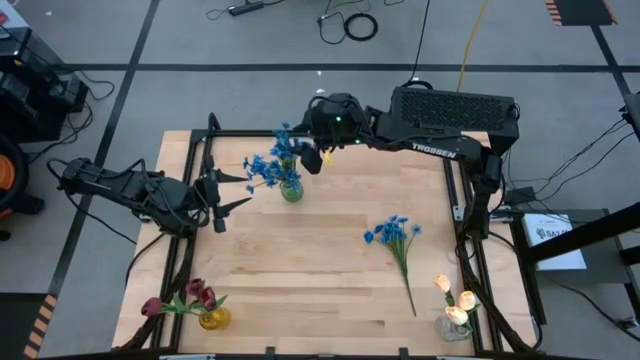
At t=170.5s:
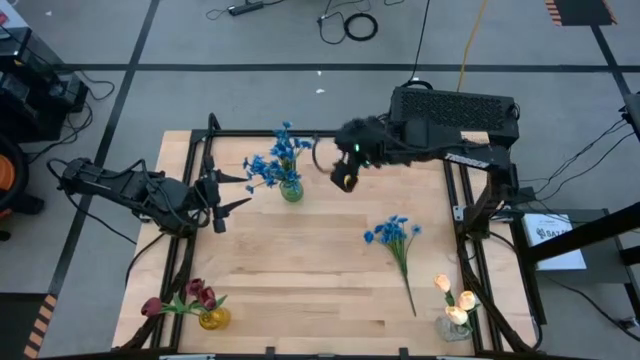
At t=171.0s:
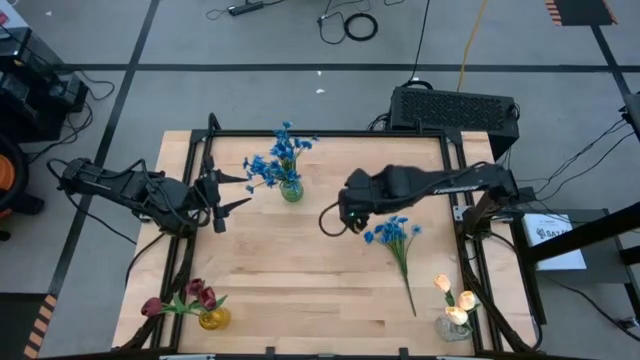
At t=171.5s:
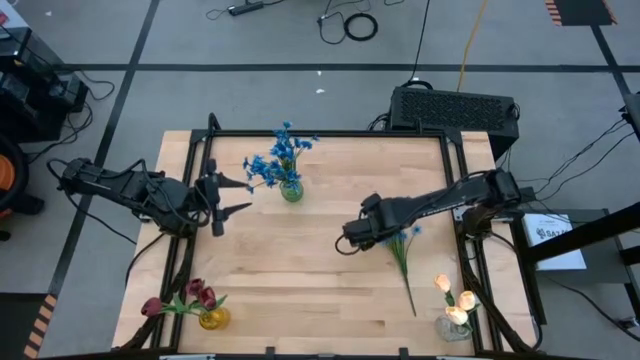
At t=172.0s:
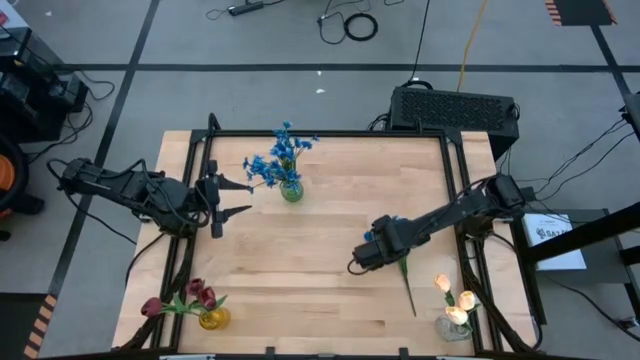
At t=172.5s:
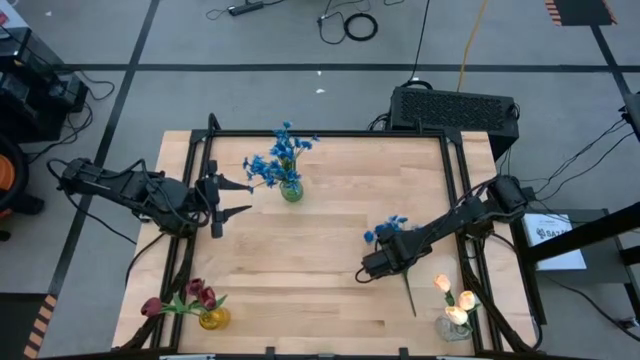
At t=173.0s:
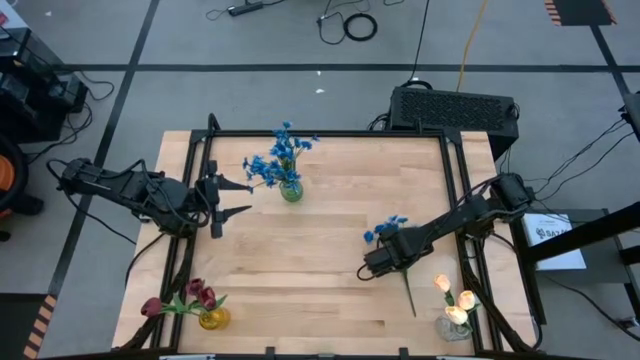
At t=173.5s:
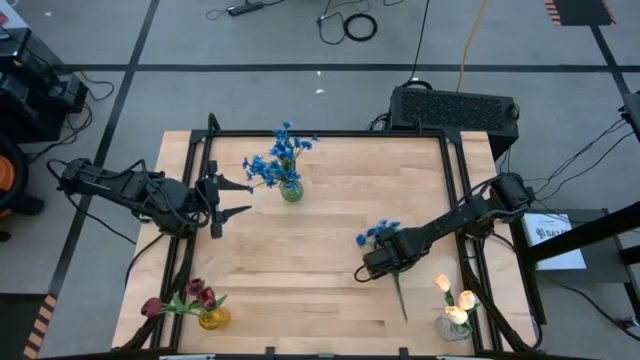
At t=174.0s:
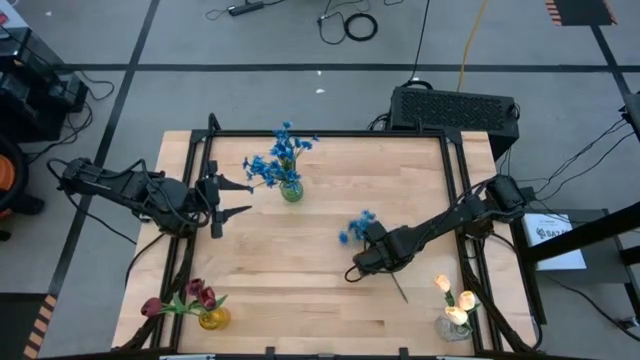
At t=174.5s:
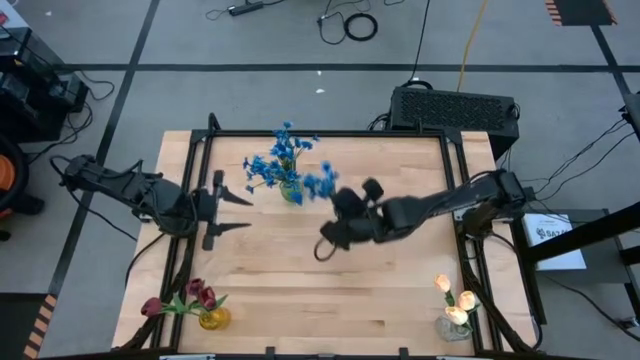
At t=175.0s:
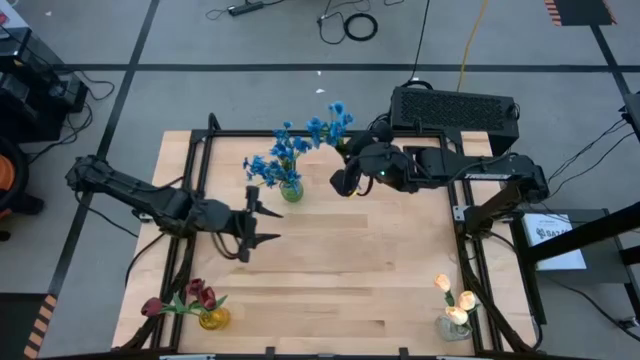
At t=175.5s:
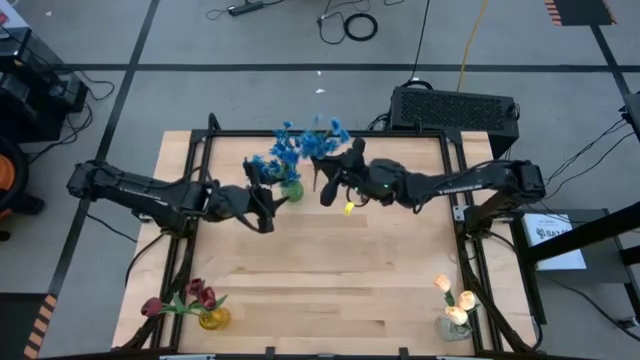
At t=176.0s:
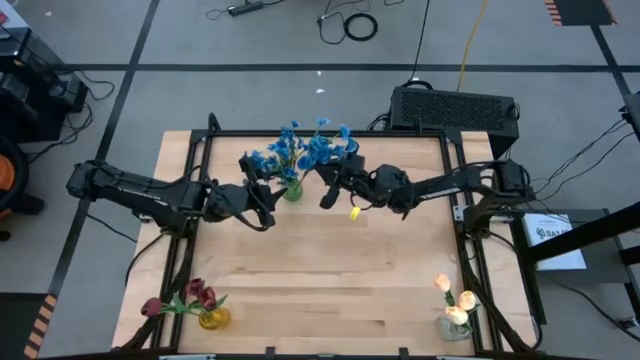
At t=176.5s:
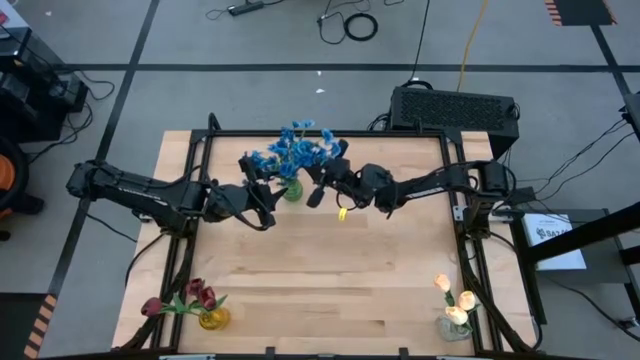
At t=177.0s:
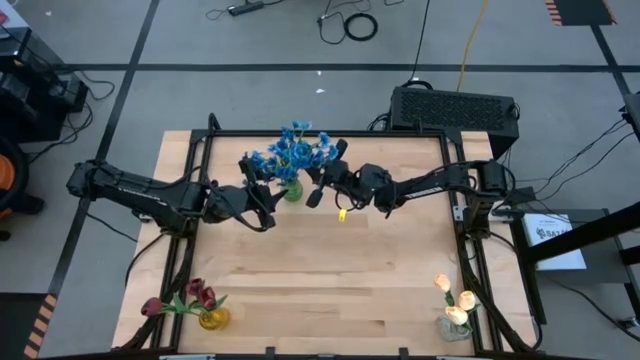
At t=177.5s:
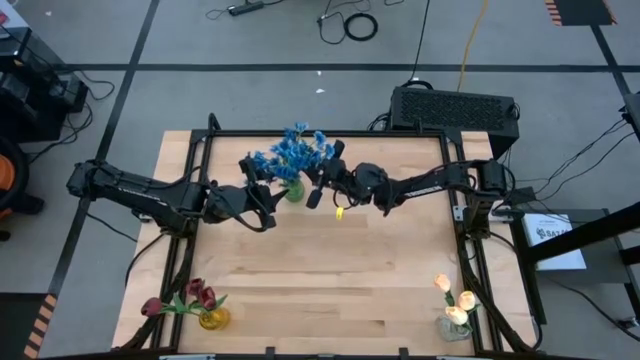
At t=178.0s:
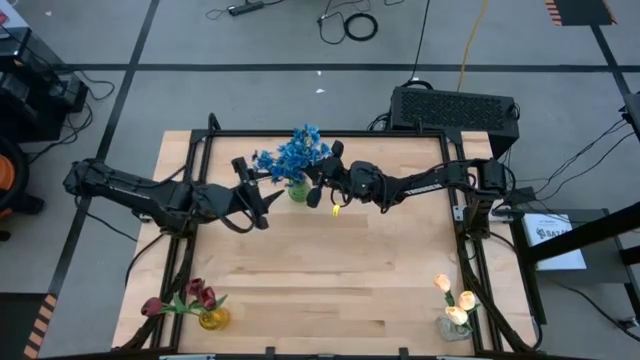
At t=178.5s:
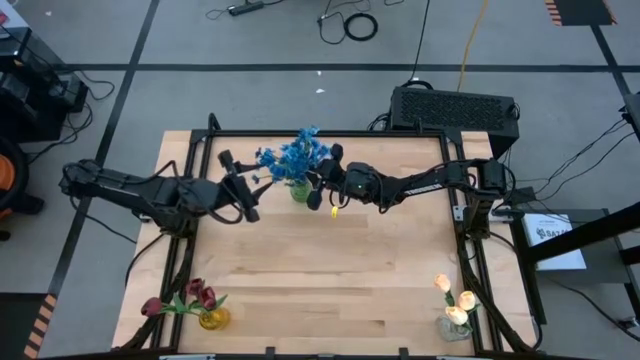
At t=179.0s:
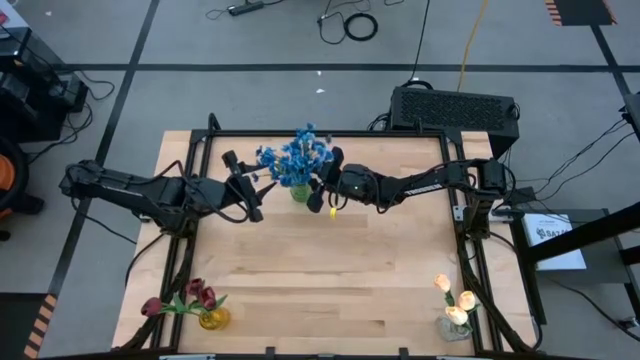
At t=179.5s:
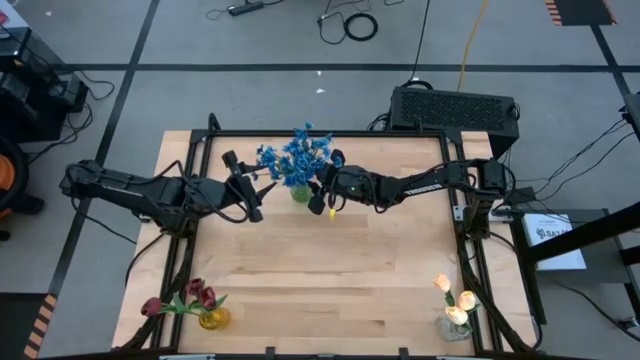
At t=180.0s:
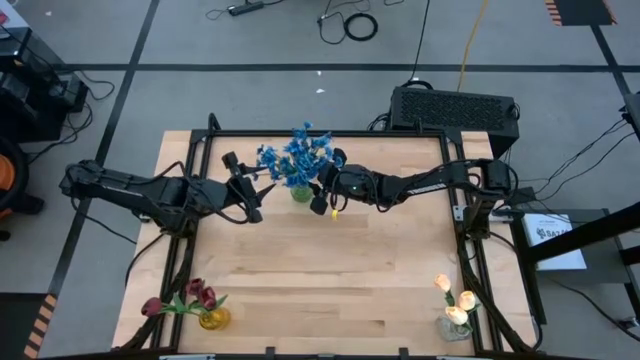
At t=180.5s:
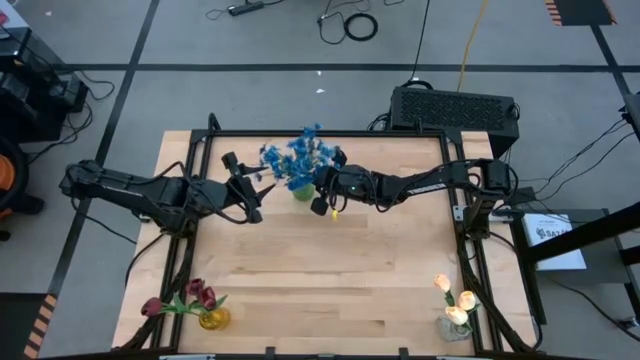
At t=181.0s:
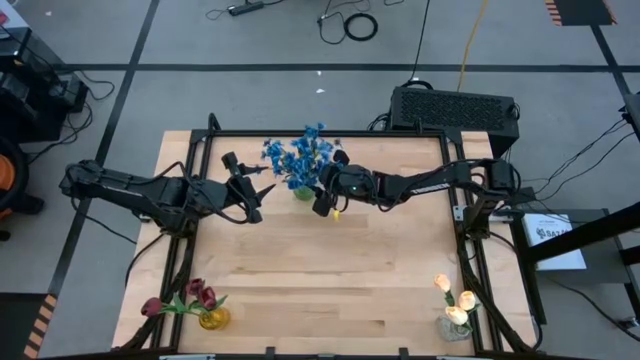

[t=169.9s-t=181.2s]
Task: Sort flowers into vase by color
Put the blue flowers into the green vase

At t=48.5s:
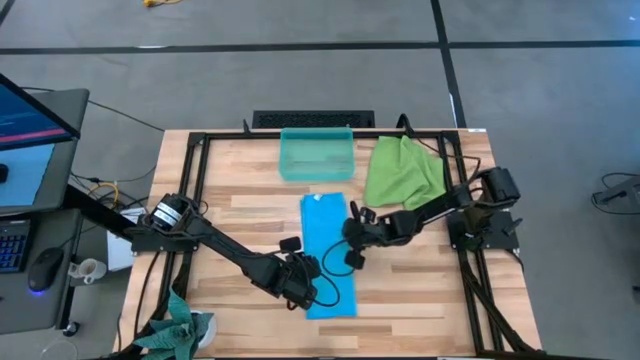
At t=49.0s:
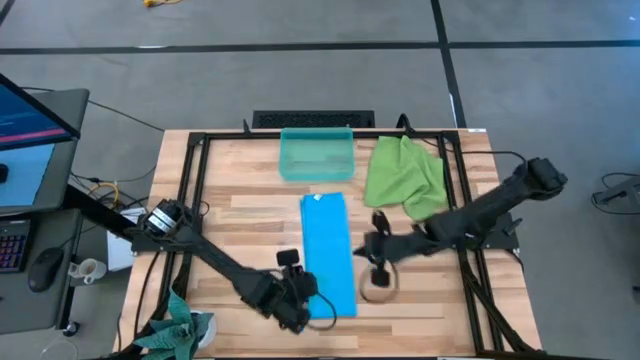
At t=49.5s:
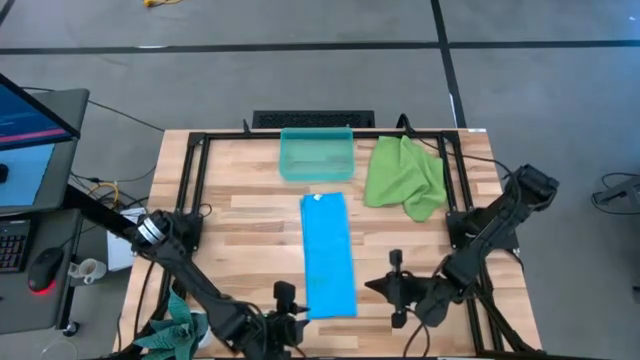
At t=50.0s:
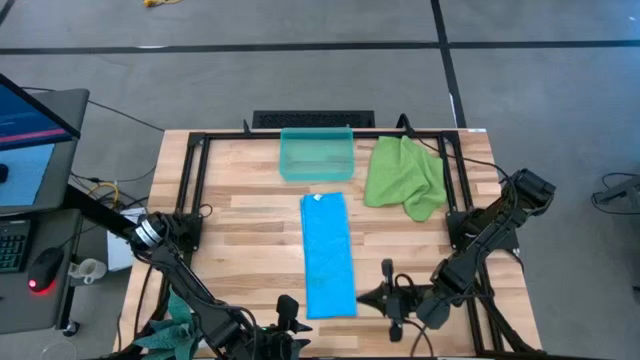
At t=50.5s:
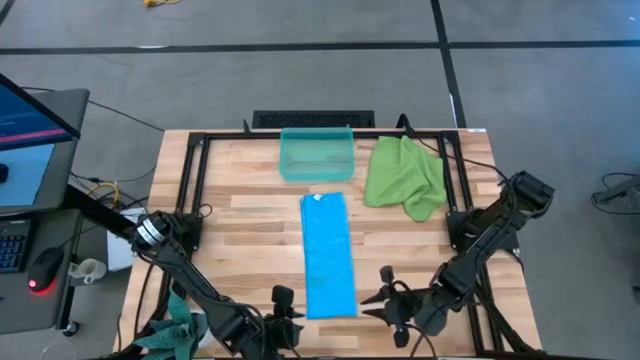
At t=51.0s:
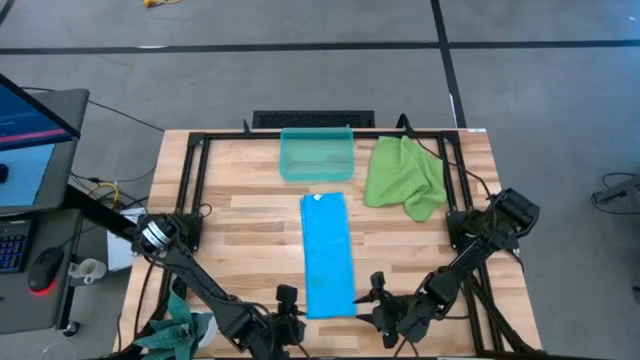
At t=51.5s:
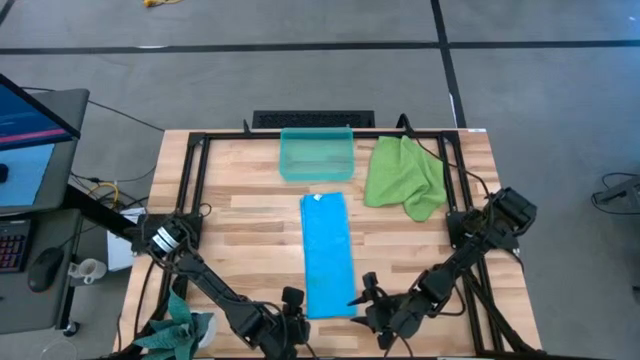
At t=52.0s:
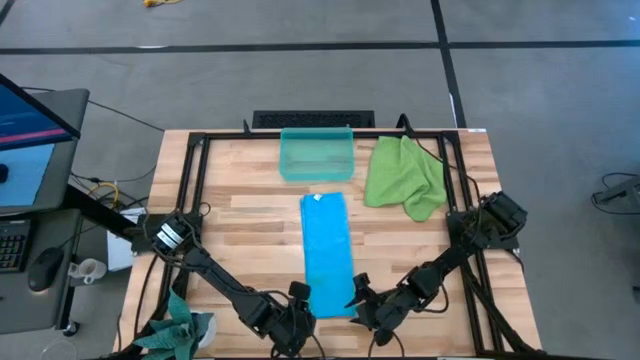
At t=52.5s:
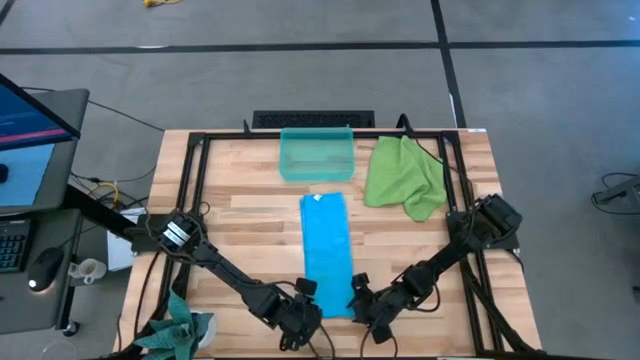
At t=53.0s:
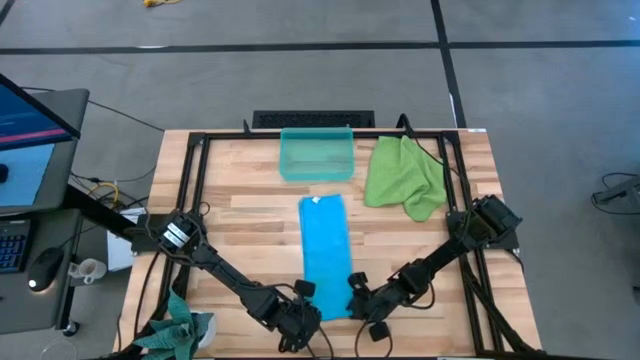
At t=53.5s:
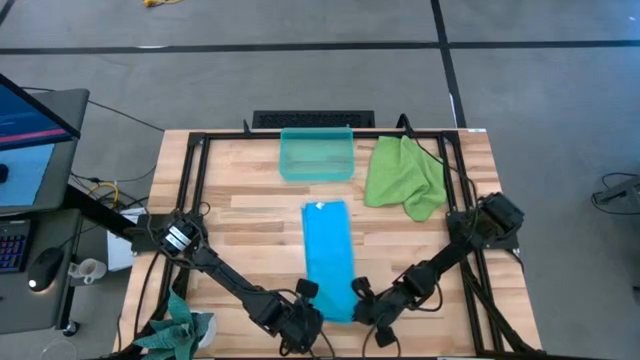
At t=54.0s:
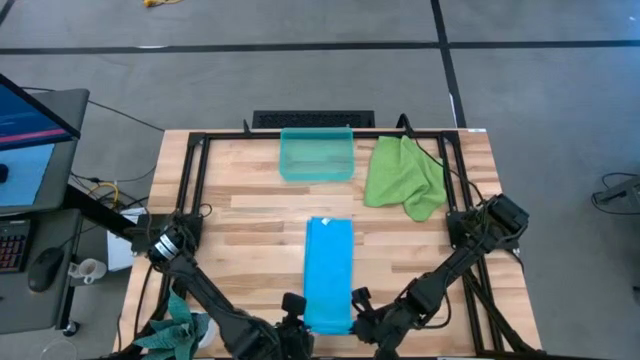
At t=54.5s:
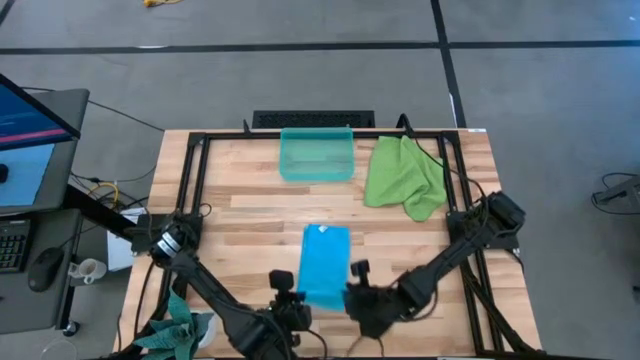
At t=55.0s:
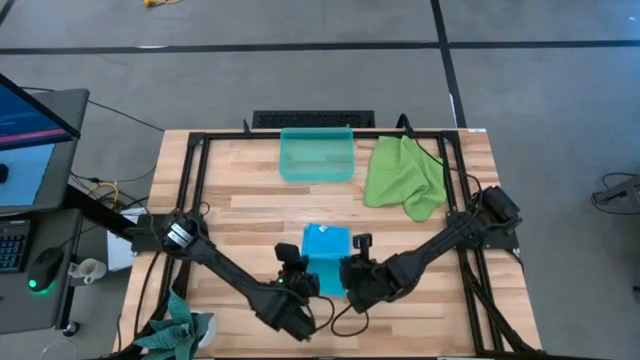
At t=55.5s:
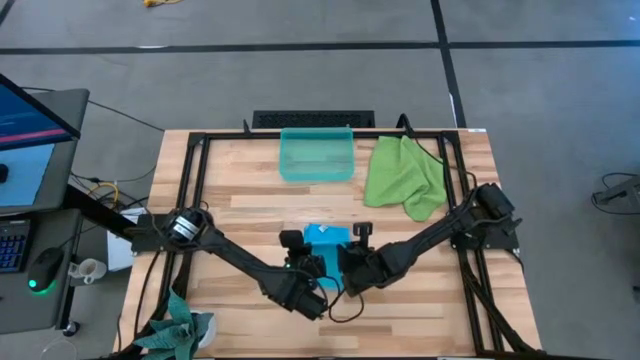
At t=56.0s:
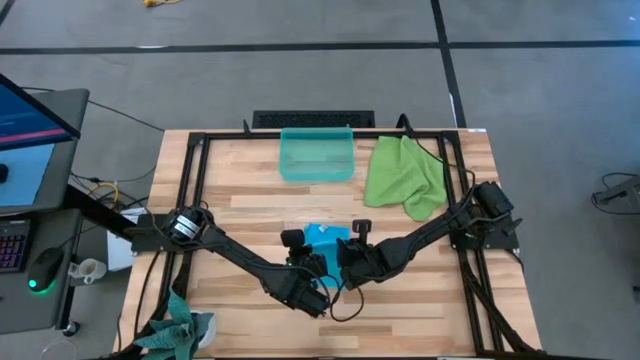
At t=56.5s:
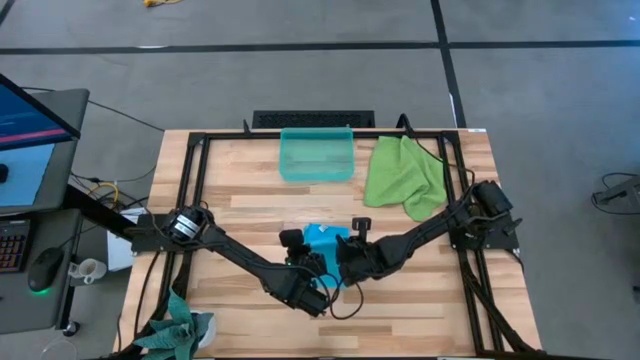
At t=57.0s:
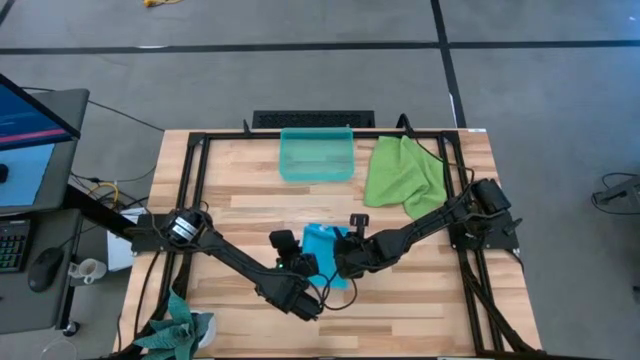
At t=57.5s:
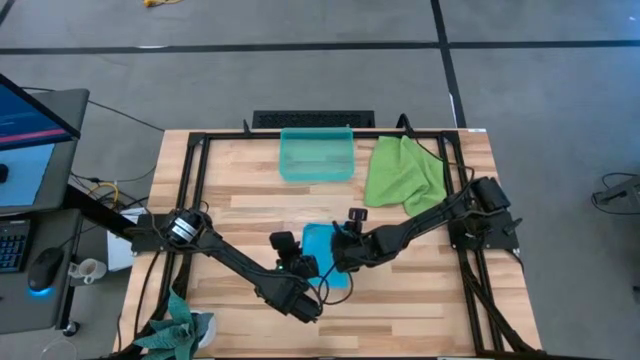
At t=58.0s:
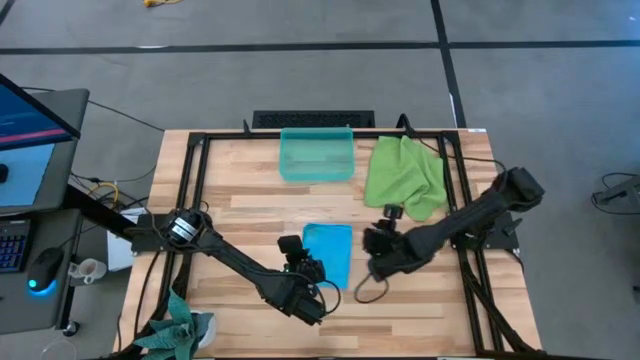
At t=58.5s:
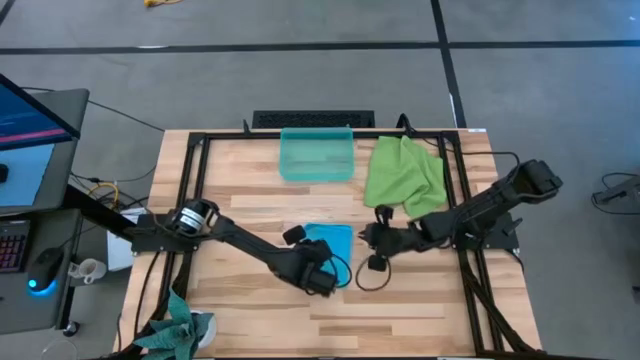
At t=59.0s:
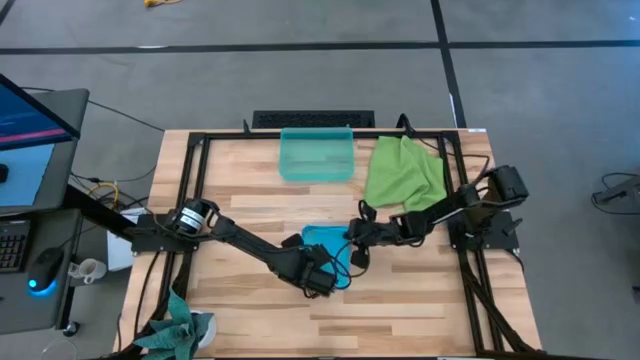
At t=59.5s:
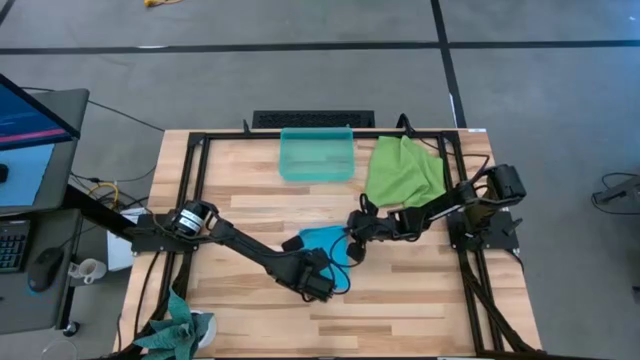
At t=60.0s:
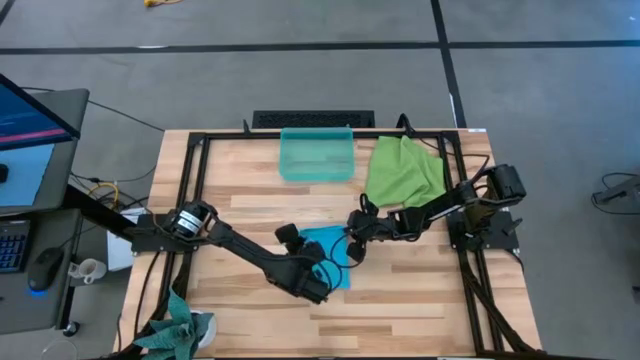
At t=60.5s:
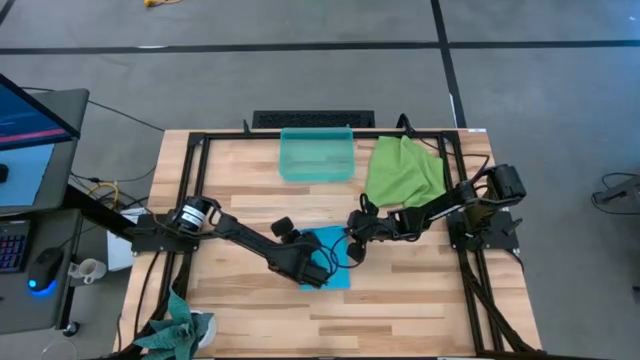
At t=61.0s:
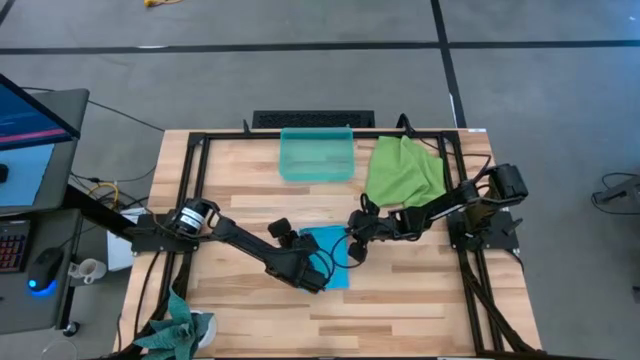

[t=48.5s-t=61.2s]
Task: Roll microfiber towels into tight, uniform cylinder then place into a basket
Fold the blue microfiber cloth
